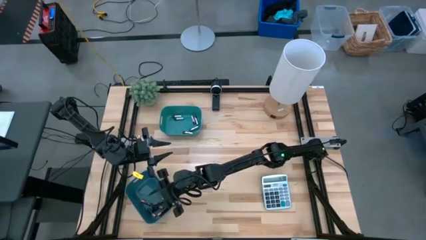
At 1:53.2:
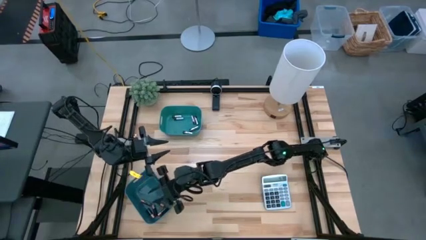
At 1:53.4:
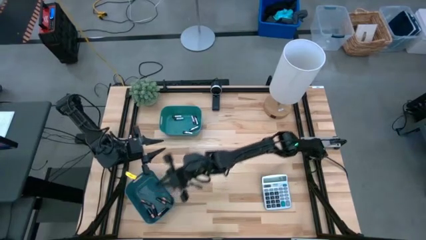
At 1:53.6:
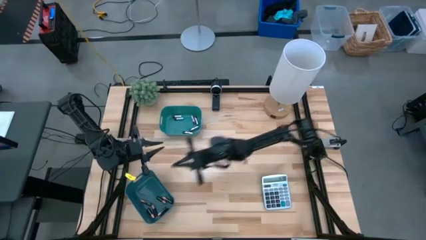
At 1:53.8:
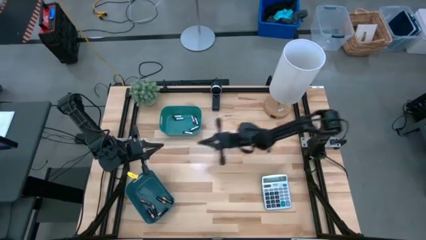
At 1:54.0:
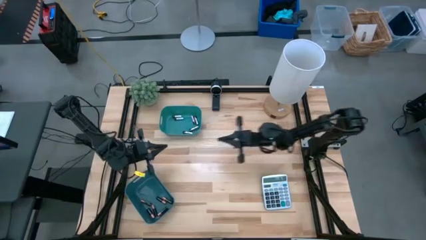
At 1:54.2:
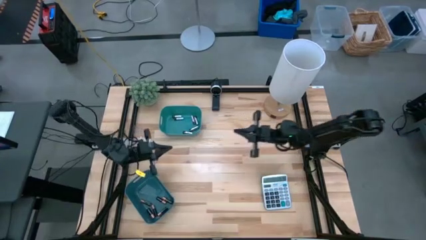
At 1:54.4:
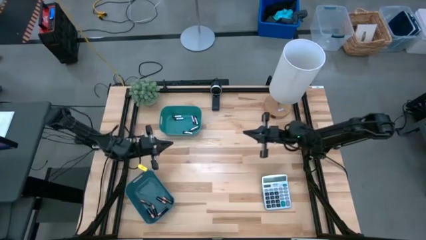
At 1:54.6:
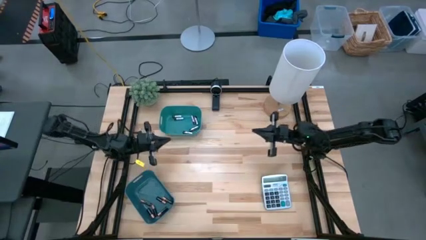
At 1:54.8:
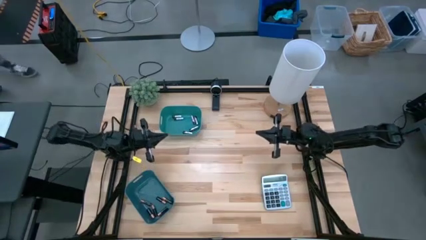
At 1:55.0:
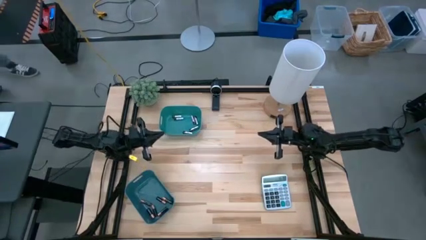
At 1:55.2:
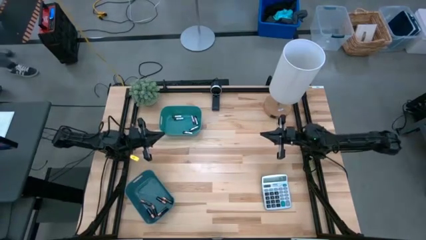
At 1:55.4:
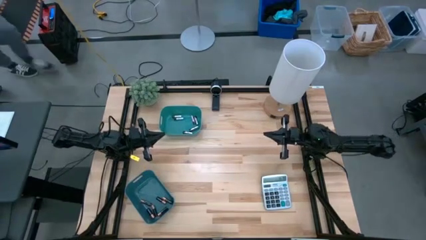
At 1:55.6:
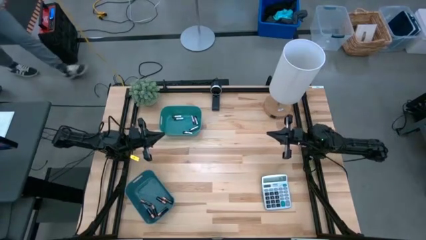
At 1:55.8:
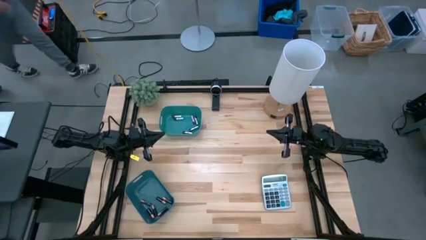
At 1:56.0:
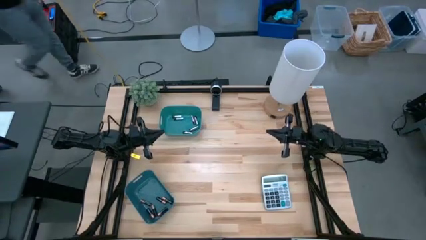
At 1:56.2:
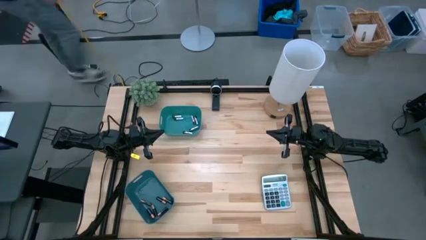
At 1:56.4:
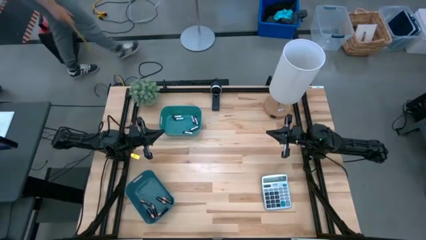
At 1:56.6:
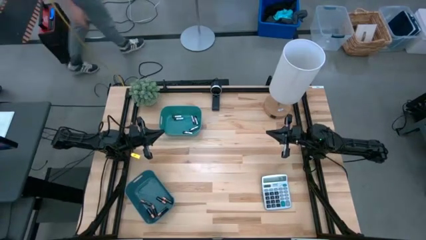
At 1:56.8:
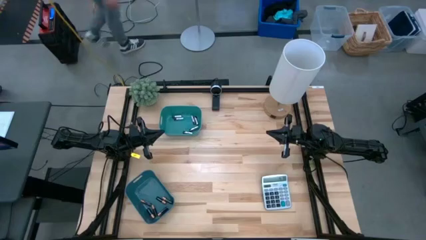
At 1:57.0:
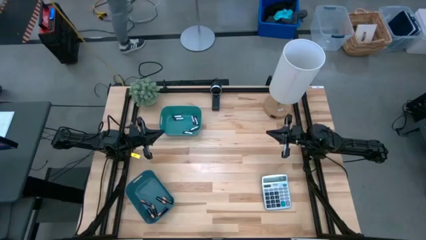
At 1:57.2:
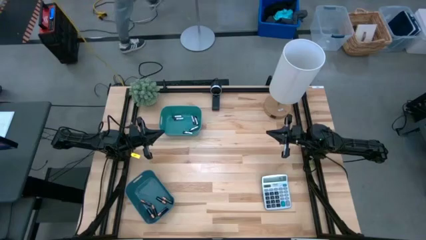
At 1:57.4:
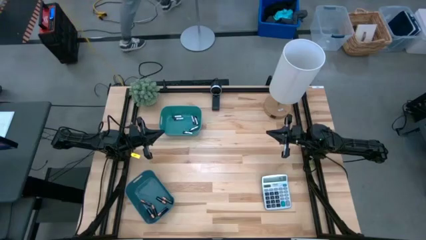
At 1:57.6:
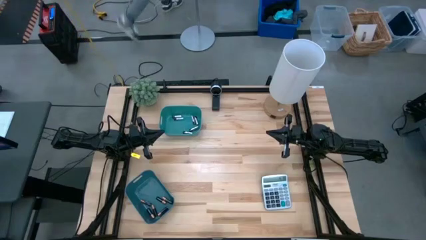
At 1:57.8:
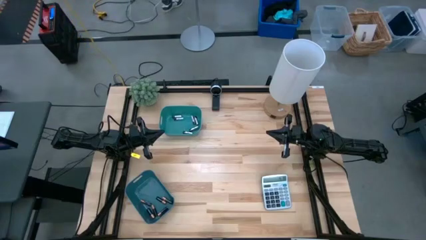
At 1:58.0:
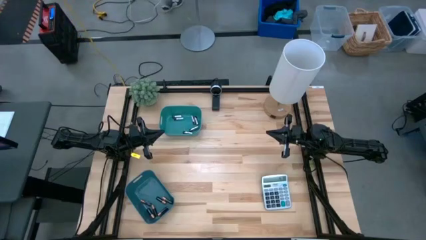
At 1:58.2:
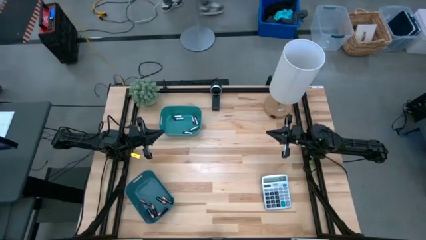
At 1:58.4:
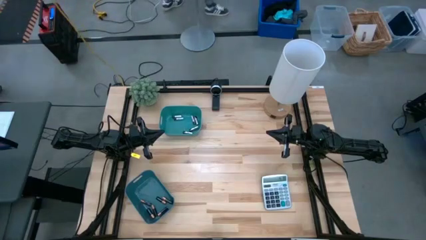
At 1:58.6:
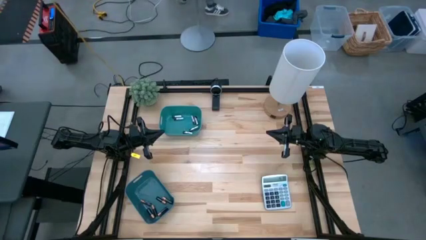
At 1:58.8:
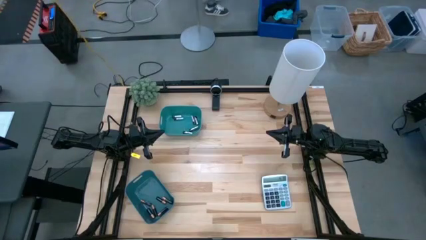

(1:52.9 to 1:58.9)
Task: Sort batteries
Return to Home Position

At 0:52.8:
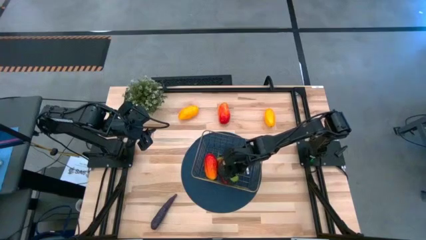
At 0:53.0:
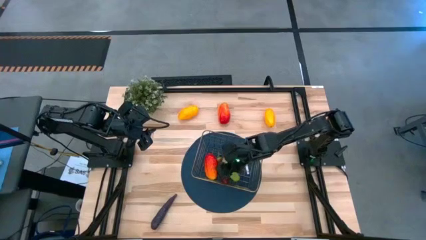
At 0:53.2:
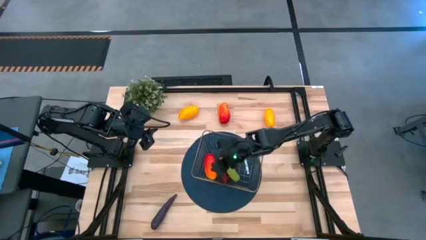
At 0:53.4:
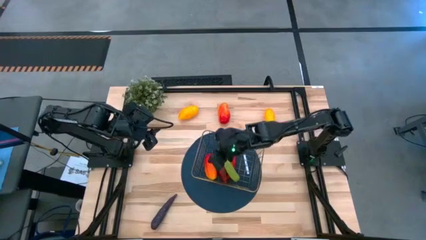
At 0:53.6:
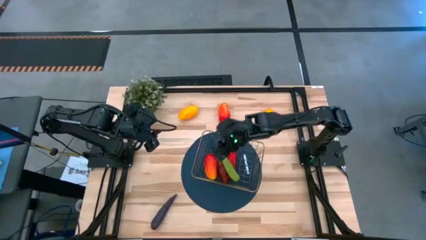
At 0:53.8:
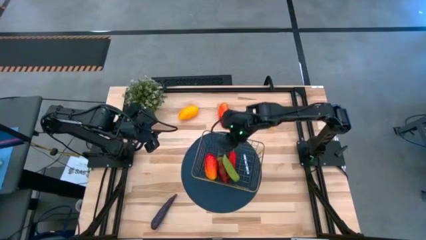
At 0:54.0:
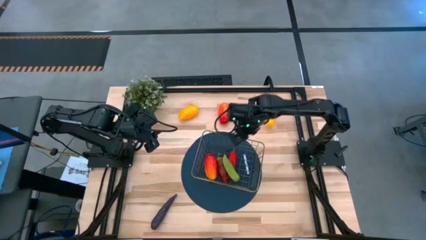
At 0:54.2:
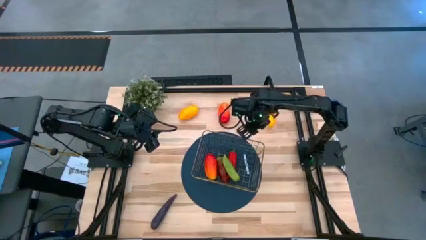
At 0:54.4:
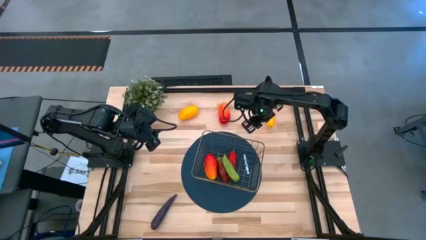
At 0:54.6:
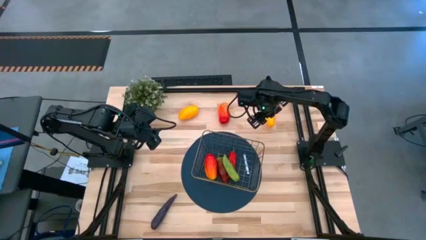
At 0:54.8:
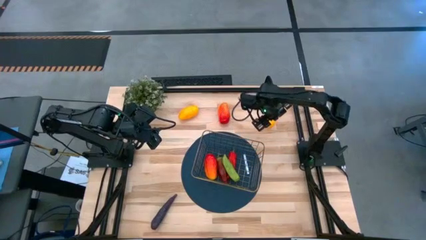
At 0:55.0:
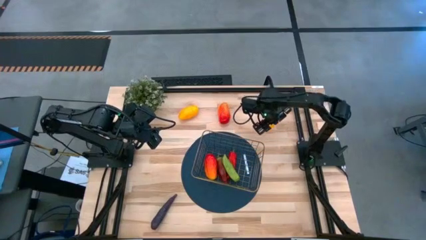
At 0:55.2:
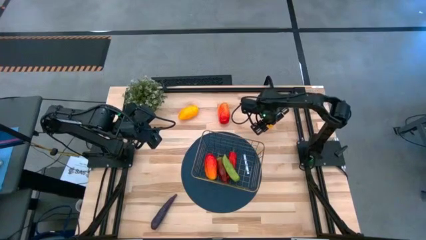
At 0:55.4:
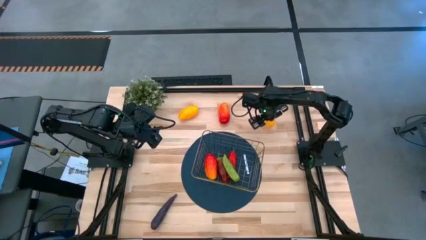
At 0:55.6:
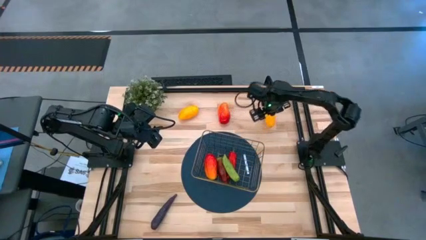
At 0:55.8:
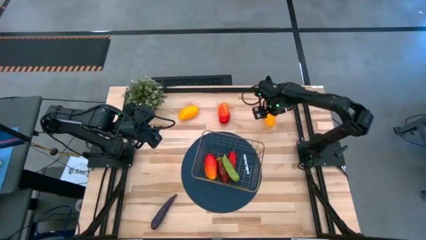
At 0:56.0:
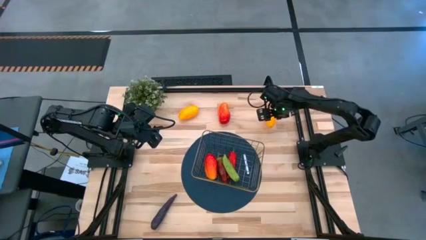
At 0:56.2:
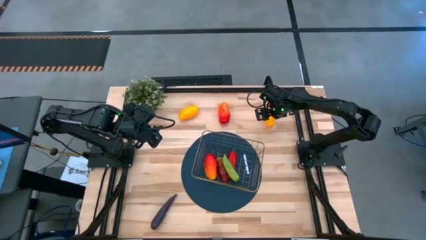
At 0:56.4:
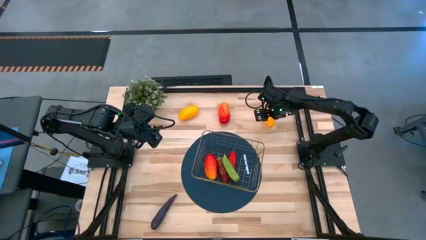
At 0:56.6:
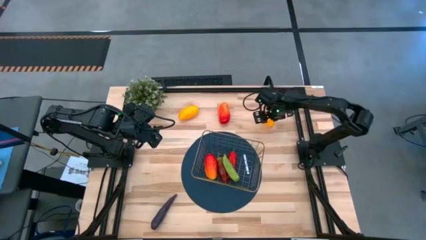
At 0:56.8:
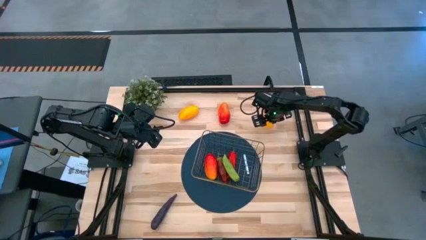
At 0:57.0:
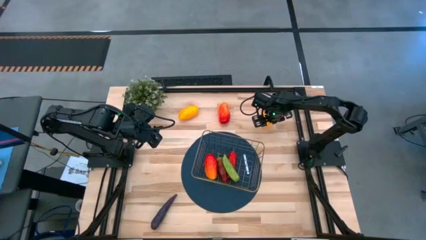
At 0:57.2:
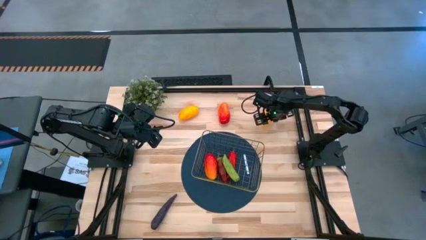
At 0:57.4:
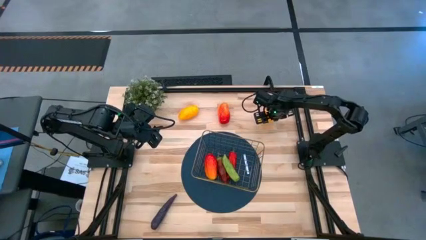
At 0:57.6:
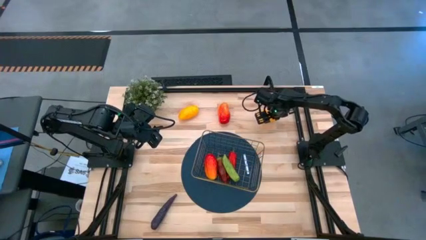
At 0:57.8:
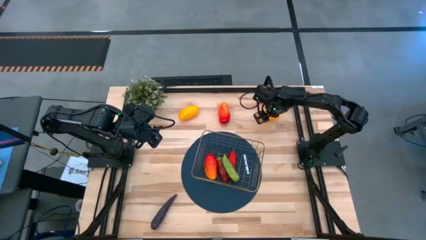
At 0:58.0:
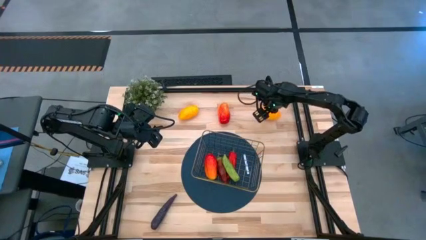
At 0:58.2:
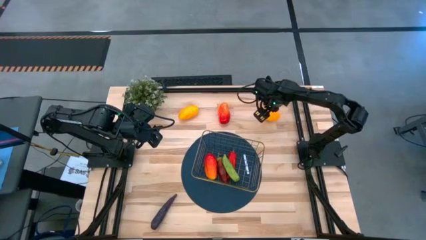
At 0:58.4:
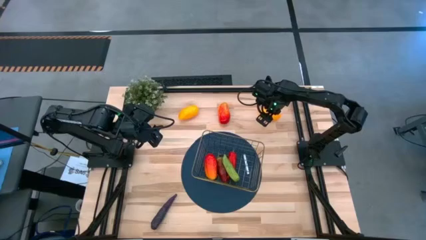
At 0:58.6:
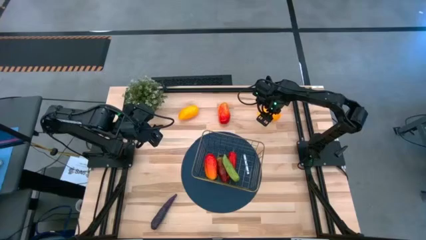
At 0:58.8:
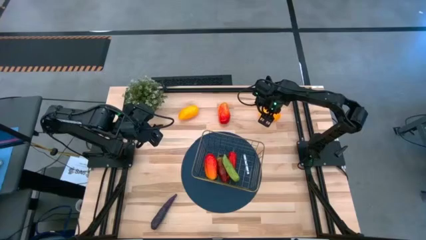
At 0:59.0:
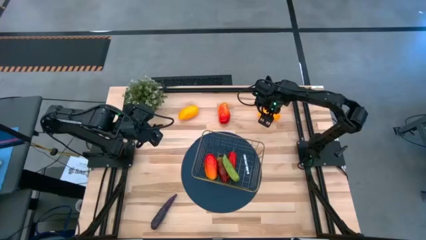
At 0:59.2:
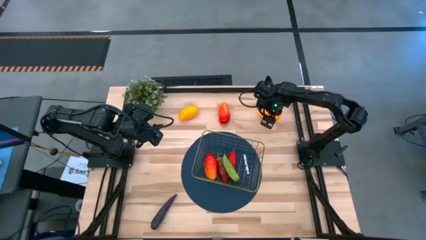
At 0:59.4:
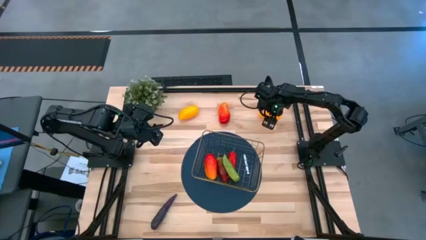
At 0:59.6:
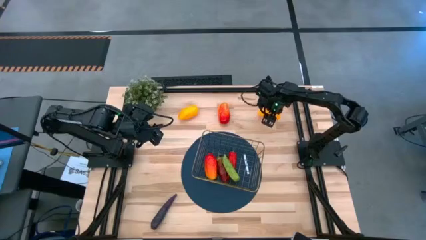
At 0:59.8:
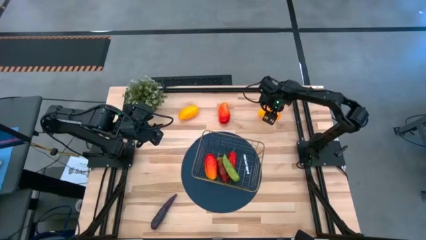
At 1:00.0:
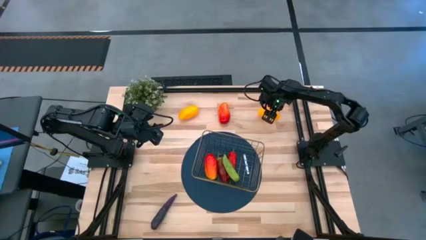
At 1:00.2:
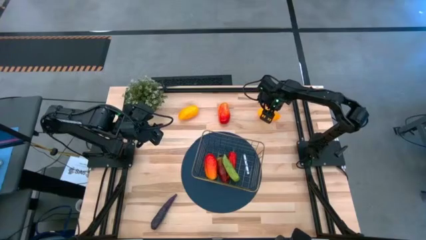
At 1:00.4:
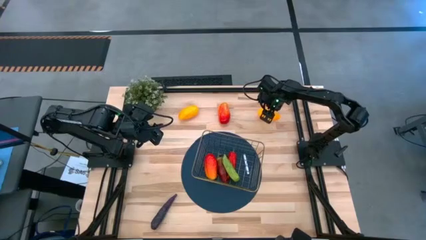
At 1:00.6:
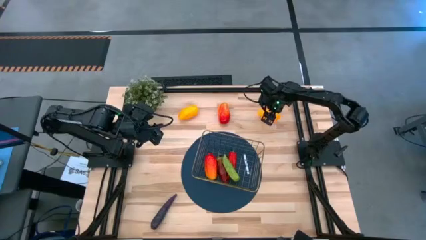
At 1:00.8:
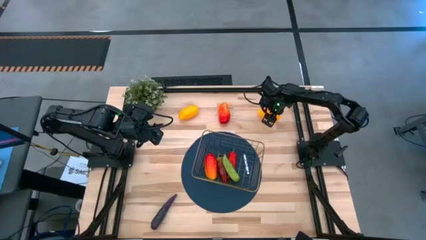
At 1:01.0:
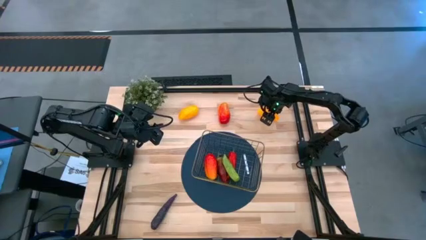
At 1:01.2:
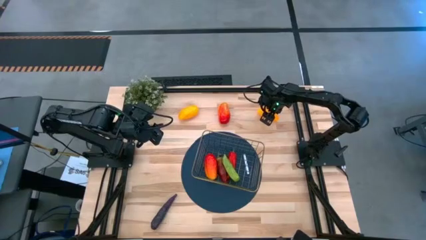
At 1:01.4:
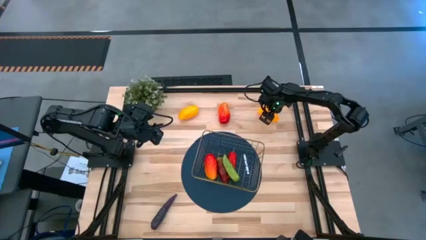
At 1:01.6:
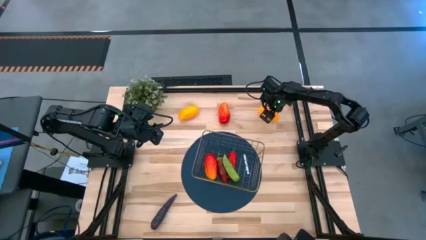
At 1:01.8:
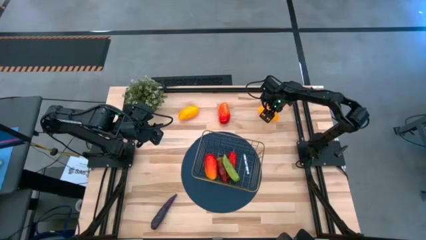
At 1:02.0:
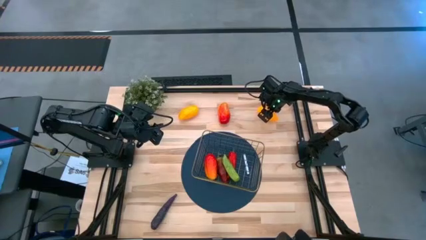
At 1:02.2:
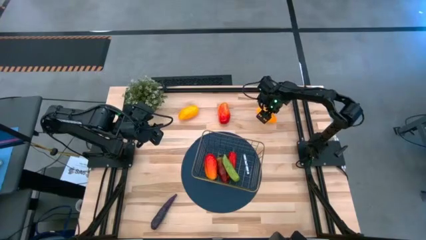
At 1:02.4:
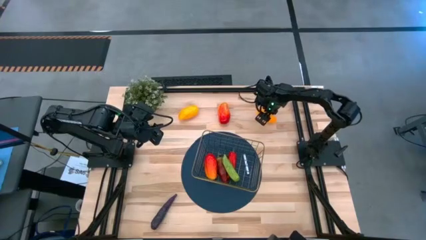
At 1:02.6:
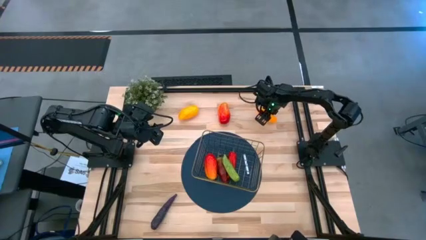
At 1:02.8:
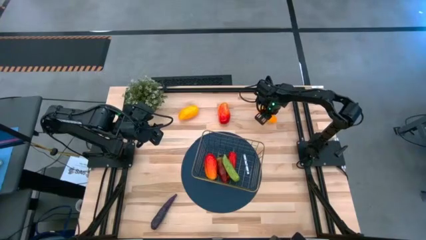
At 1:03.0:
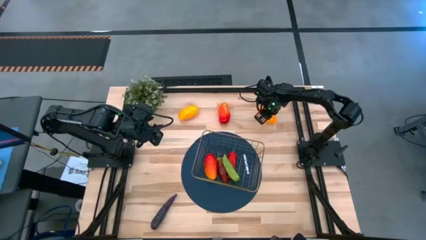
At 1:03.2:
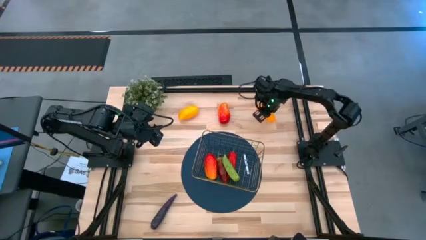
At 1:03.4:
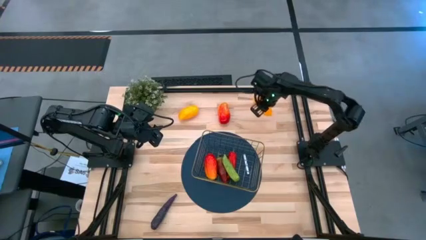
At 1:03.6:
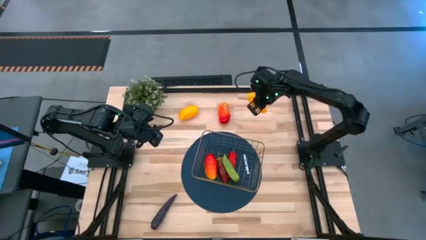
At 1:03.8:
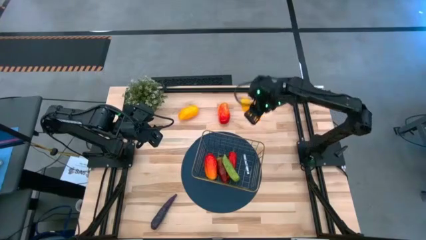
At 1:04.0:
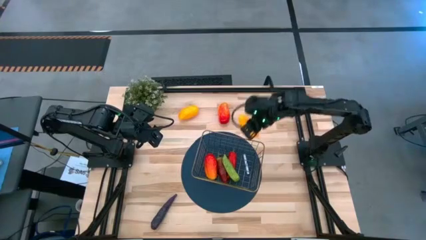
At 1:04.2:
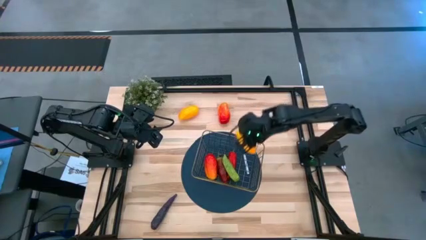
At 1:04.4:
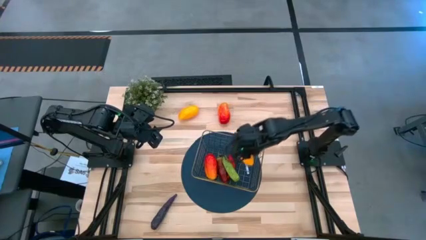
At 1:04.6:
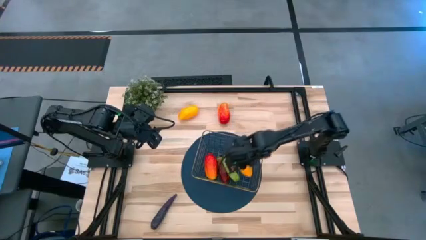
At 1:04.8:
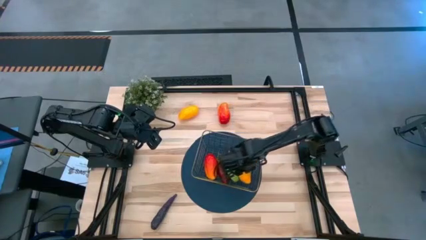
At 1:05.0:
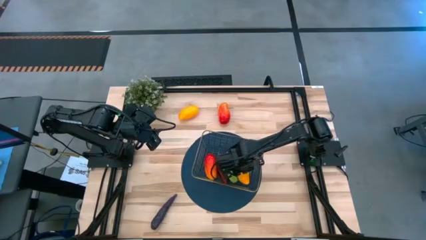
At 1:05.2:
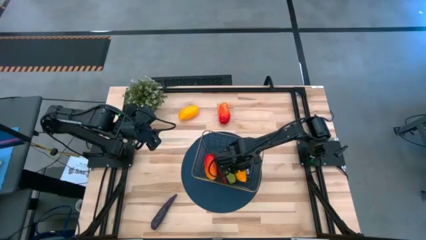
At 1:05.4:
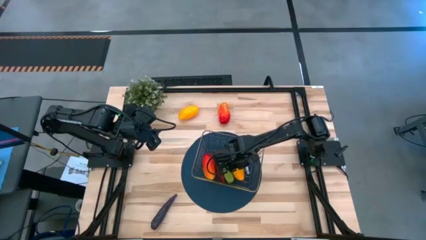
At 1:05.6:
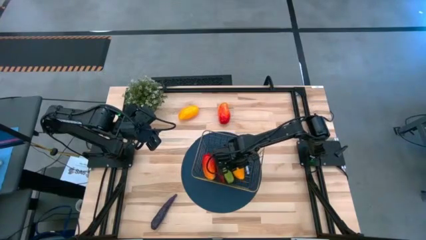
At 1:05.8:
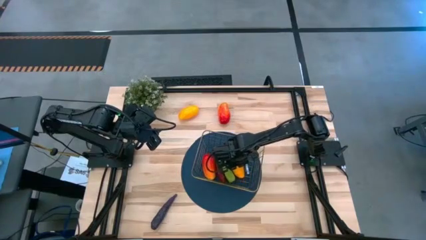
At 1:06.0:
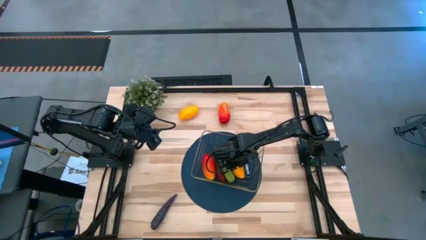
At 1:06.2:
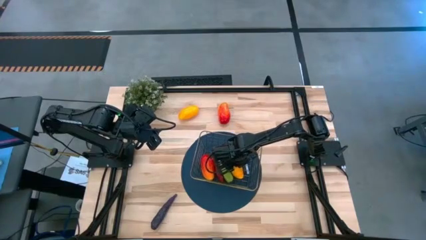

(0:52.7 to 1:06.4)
Task: Build produce basket
Put the right yellow mango into the gold wire basket
